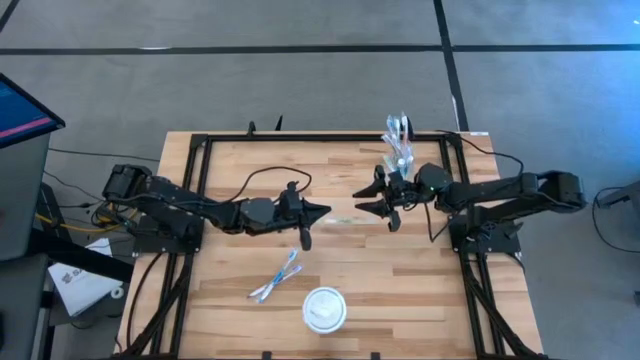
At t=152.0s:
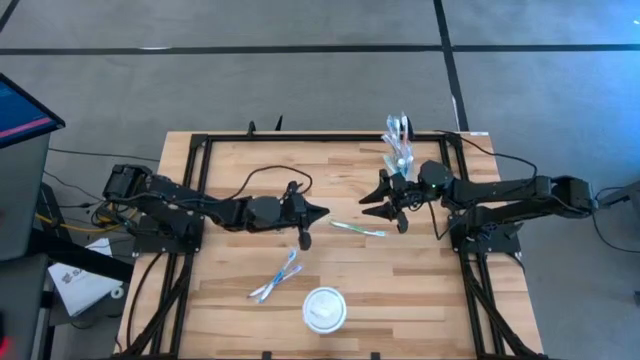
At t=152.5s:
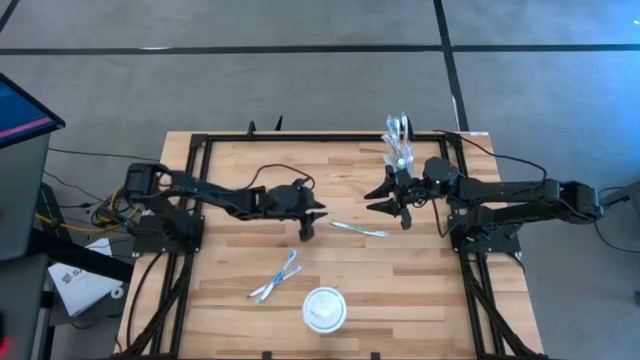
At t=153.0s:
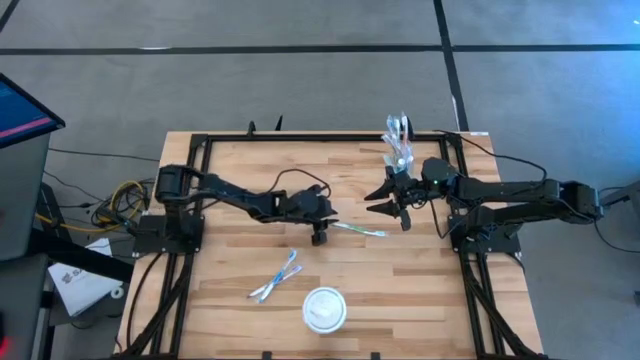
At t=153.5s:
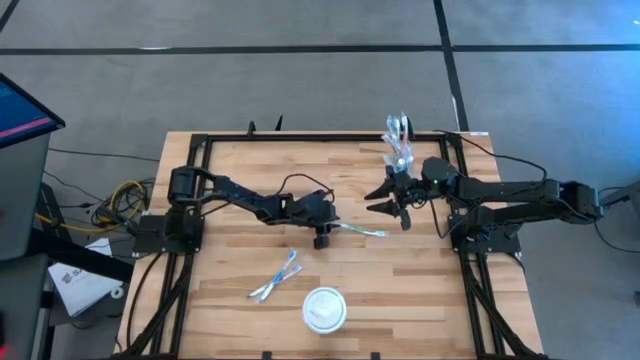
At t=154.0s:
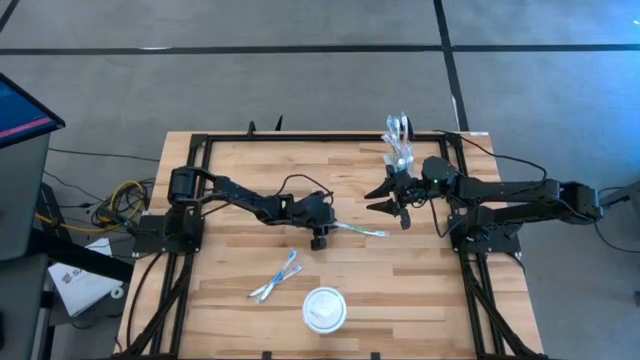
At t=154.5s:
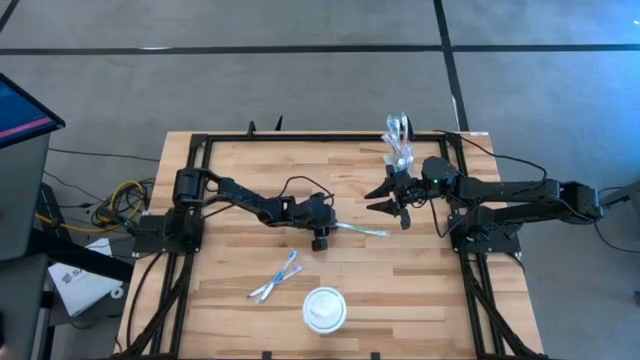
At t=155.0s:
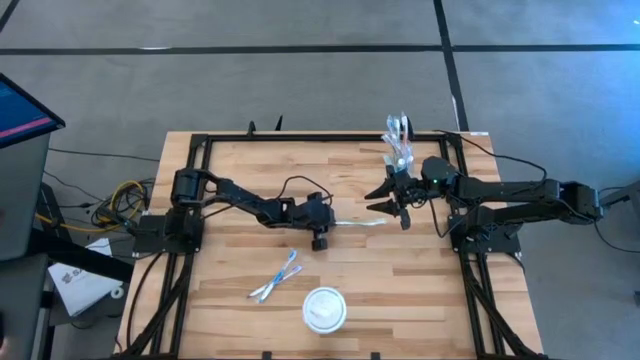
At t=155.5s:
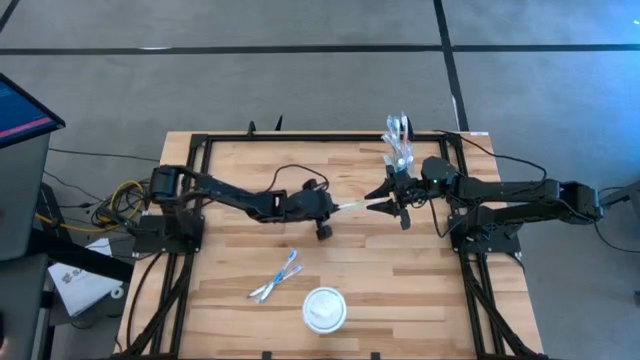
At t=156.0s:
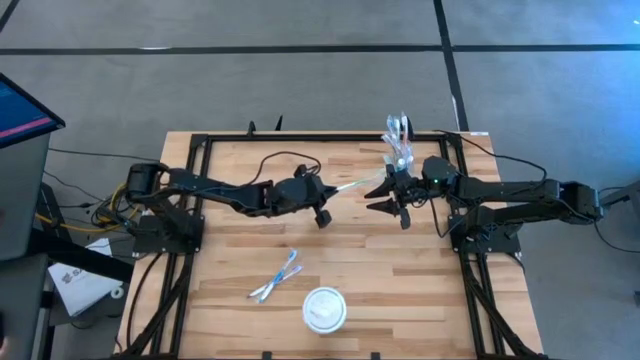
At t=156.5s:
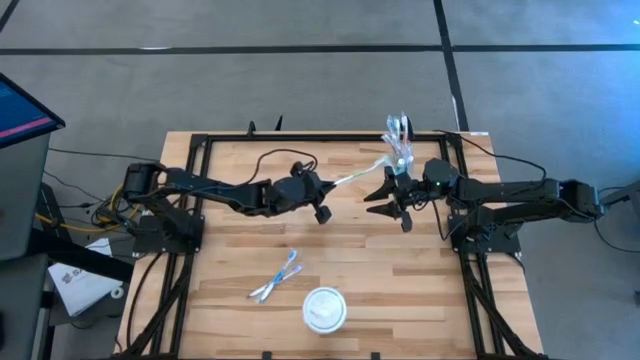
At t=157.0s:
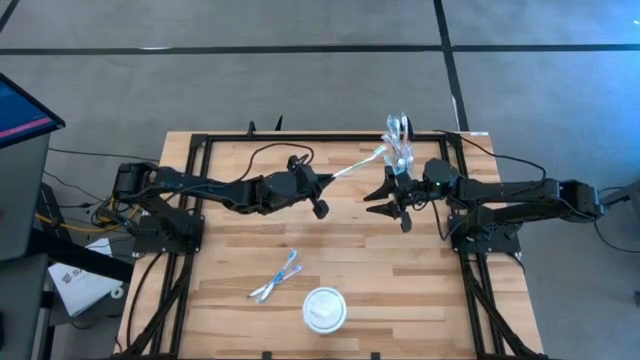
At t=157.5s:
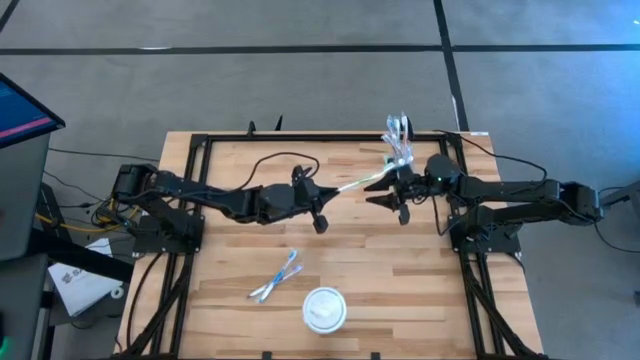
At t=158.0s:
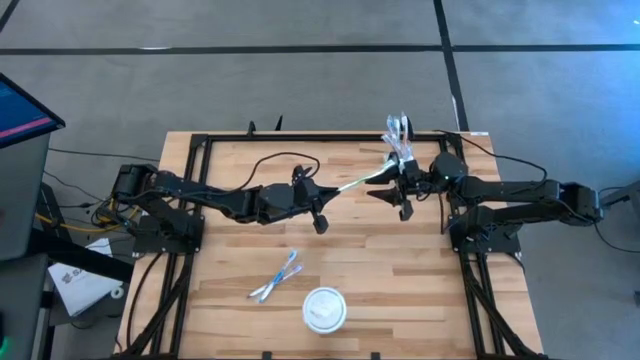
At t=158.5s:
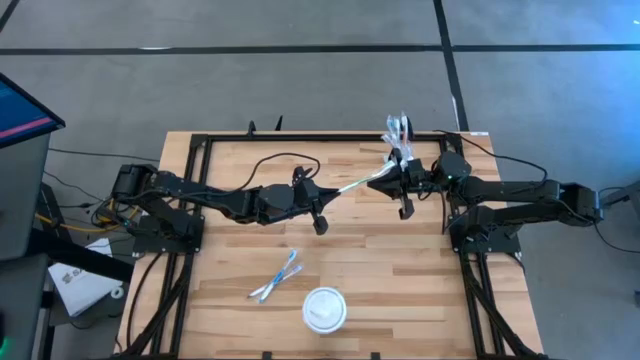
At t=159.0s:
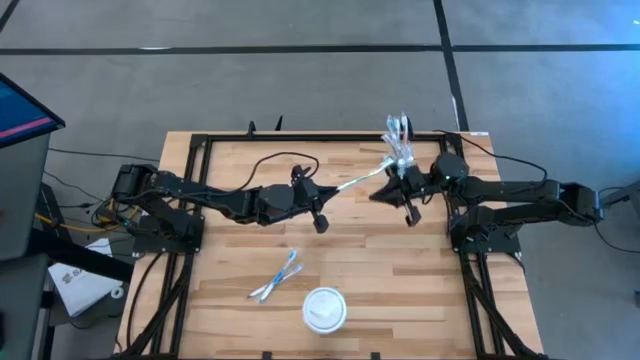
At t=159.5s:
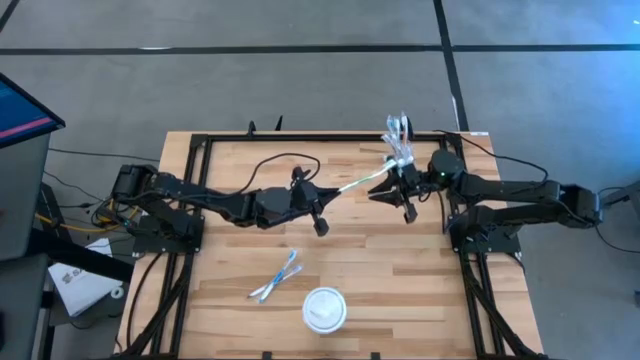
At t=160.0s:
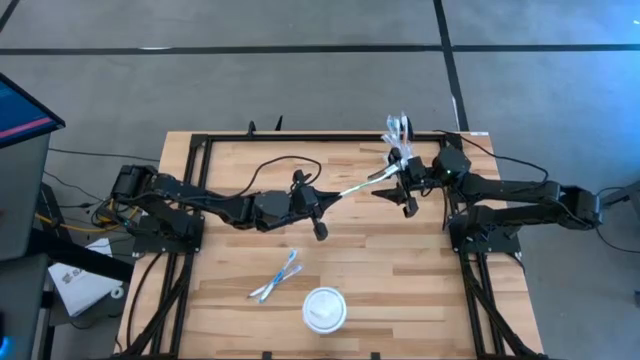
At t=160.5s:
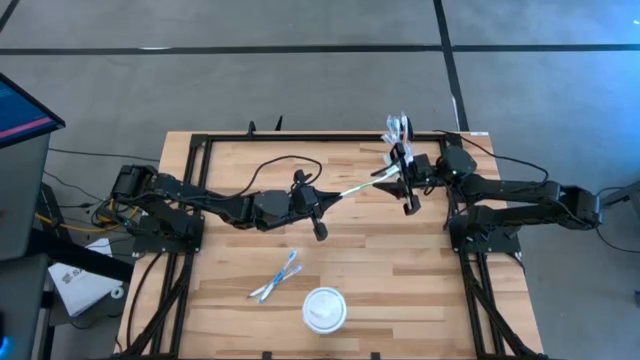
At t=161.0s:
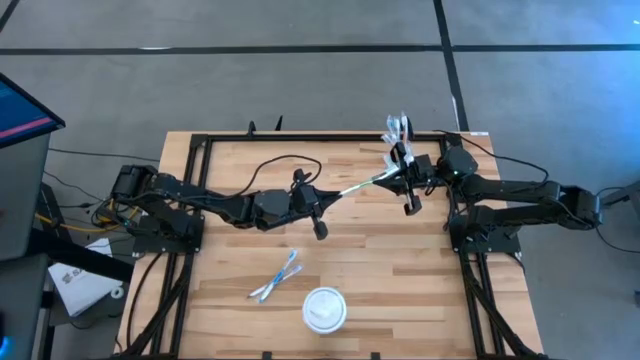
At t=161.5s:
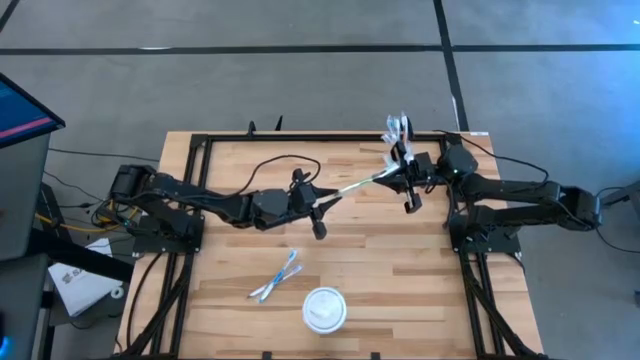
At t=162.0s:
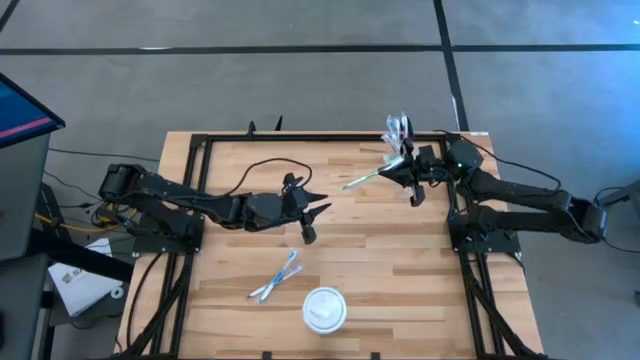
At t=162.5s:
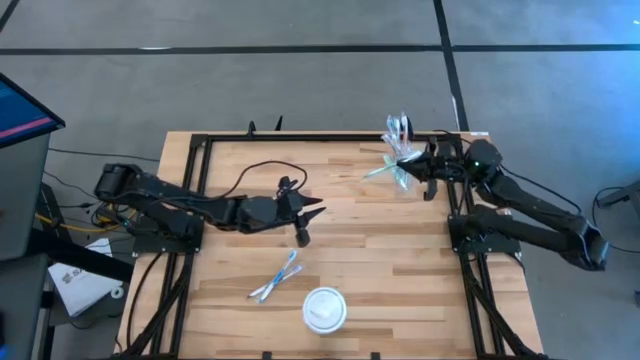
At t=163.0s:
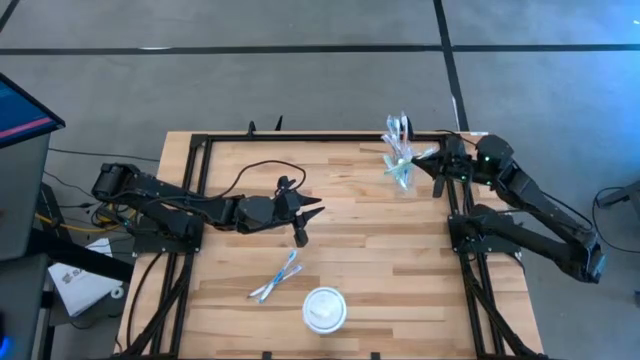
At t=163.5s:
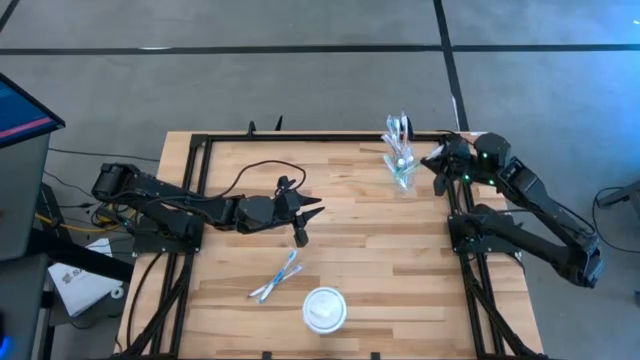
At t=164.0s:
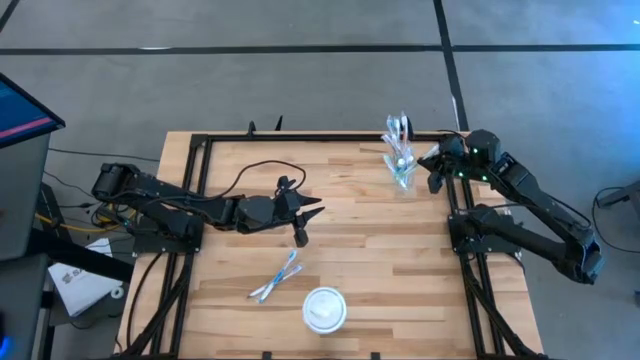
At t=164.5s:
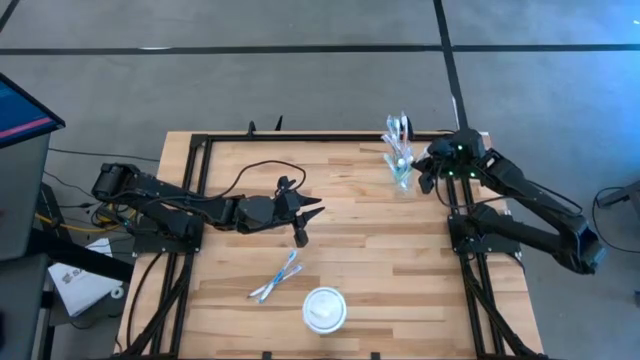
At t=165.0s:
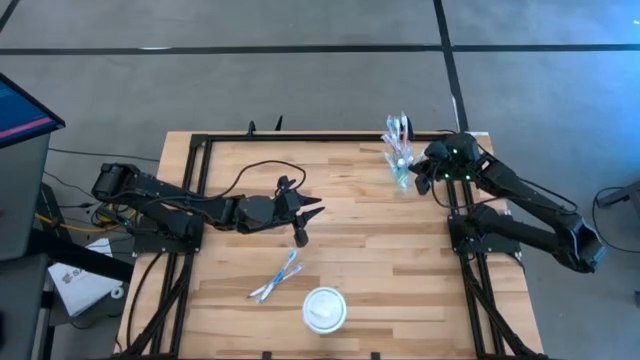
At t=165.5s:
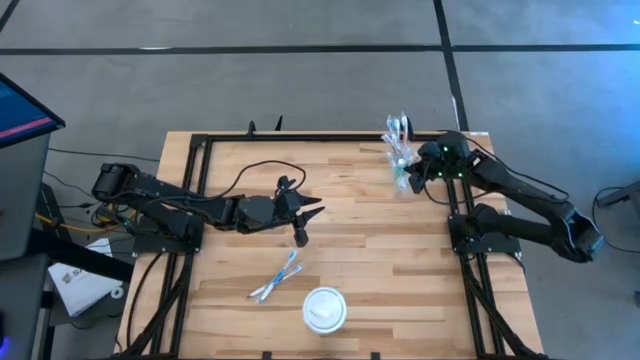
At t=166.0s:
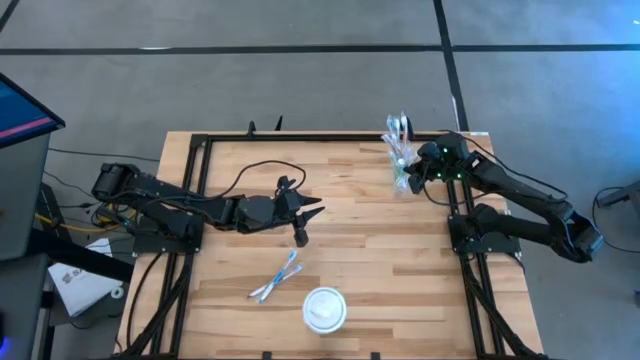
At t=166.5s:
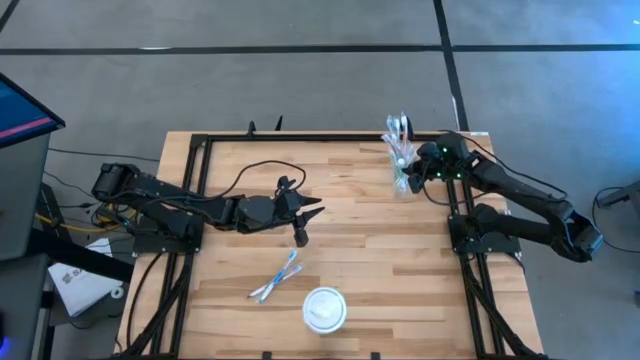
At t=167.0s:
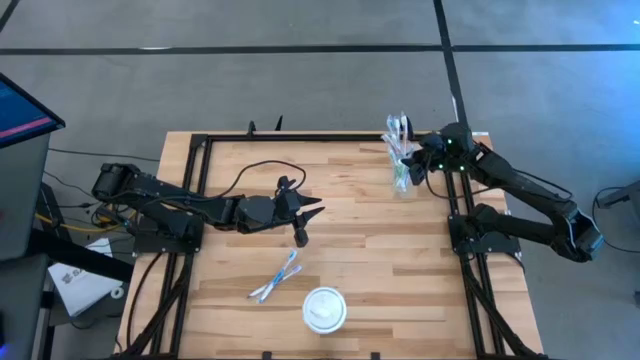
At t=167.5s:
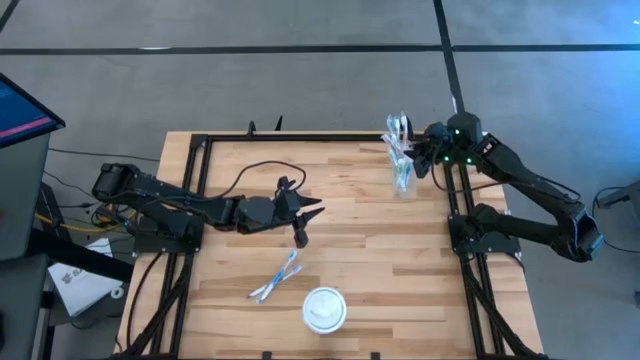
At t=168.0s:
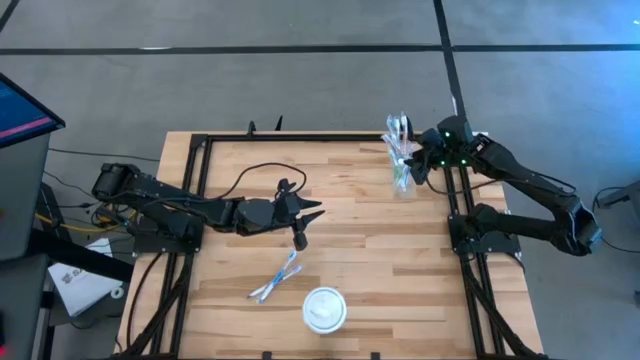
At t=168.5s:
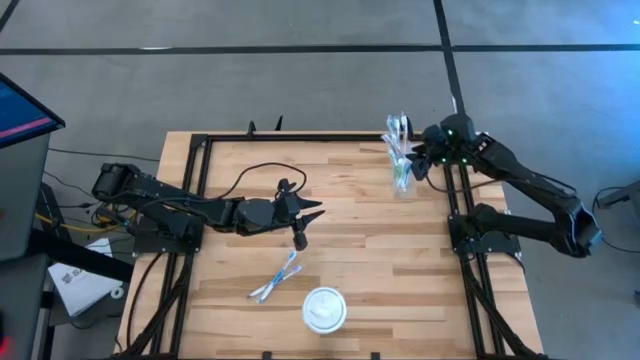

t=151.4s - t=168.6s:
Task: Pick & Place toothbrushing station
Put the green toothbrush into the transparent organizer
